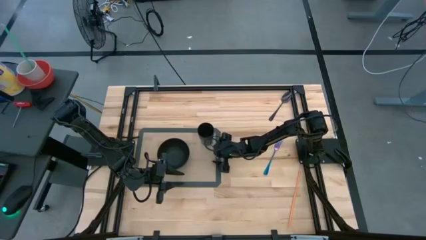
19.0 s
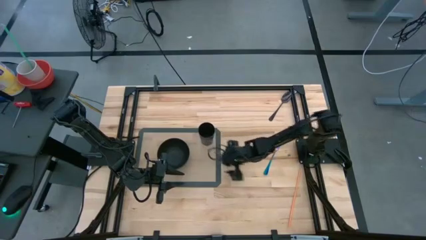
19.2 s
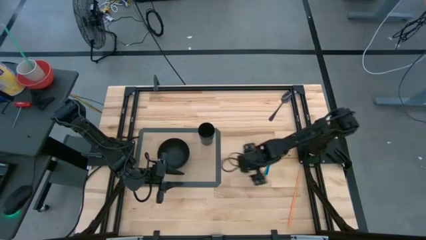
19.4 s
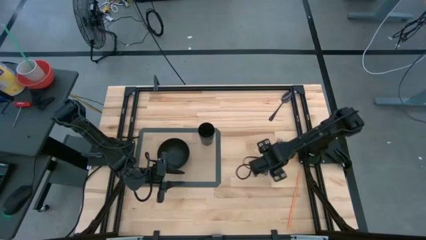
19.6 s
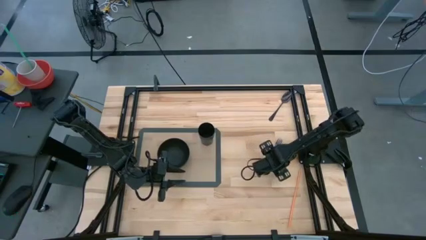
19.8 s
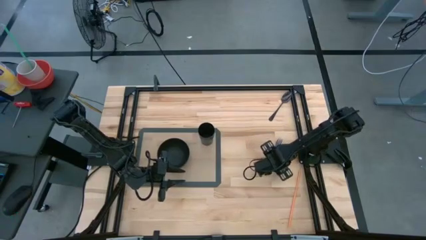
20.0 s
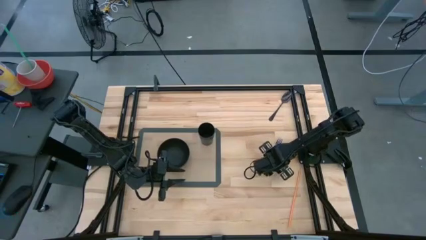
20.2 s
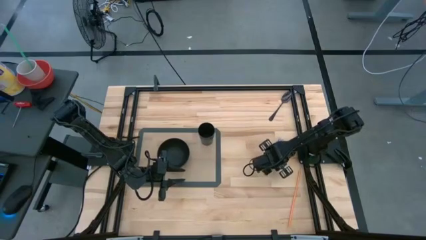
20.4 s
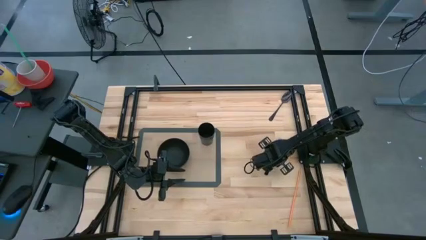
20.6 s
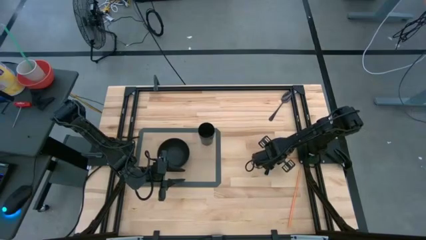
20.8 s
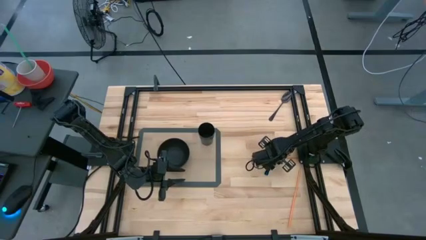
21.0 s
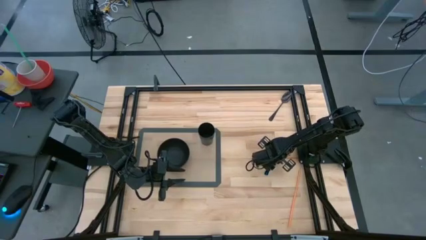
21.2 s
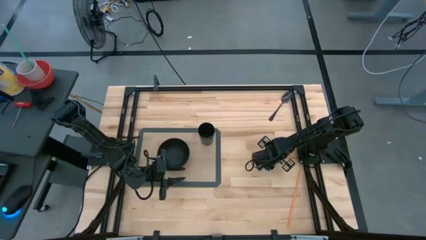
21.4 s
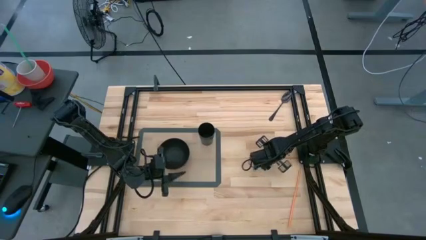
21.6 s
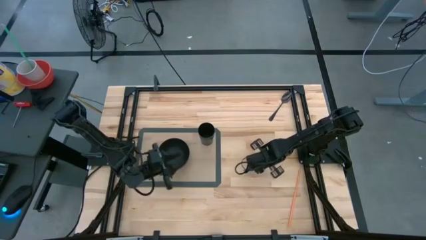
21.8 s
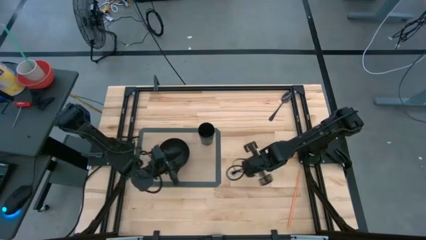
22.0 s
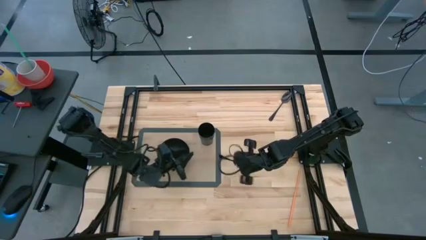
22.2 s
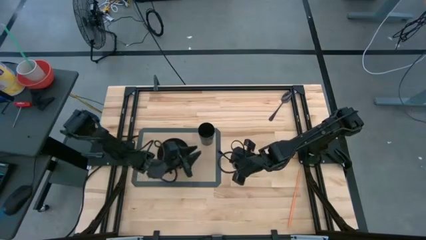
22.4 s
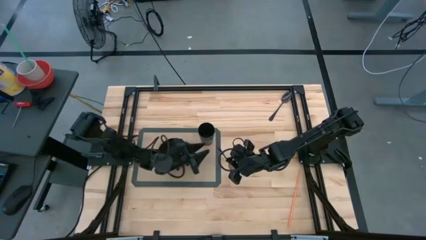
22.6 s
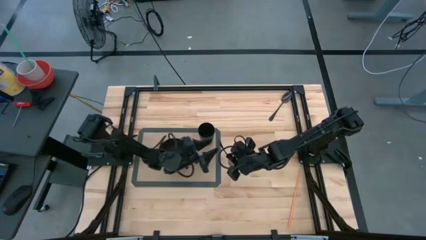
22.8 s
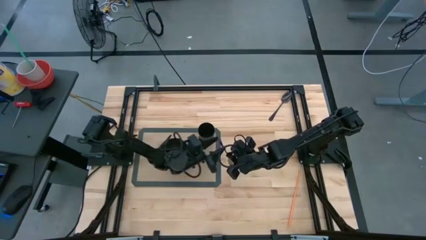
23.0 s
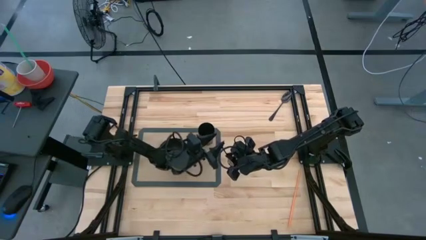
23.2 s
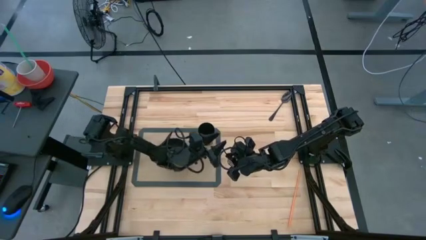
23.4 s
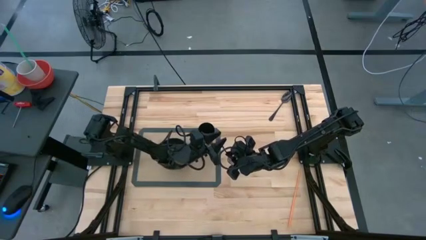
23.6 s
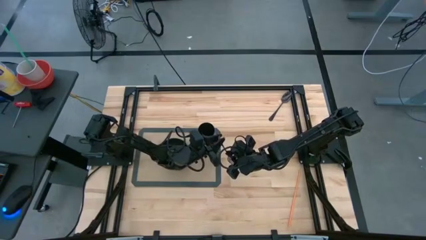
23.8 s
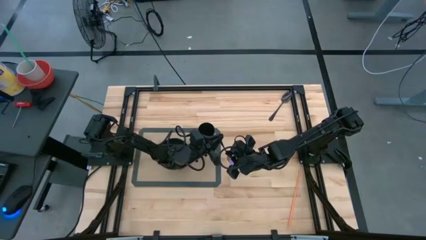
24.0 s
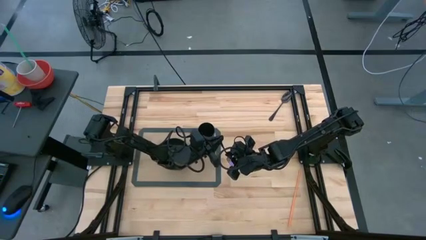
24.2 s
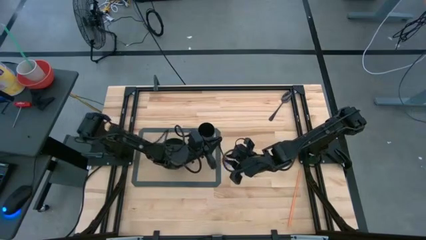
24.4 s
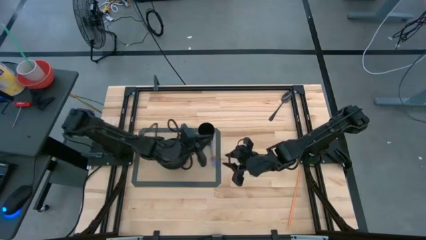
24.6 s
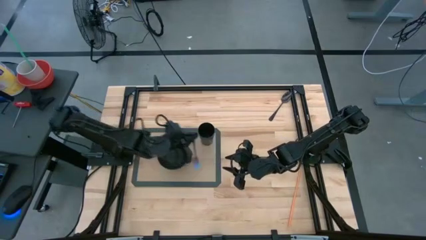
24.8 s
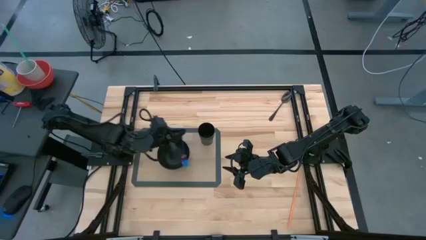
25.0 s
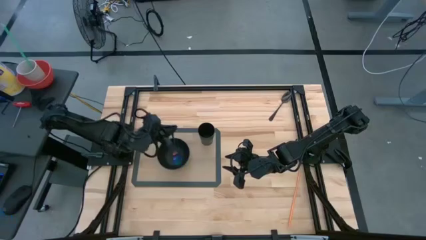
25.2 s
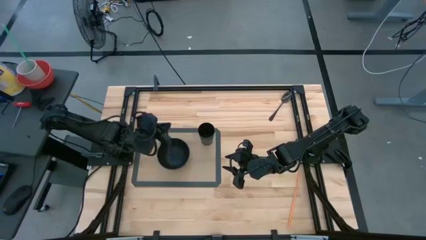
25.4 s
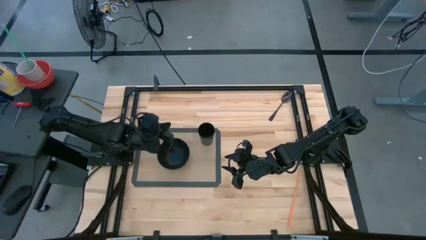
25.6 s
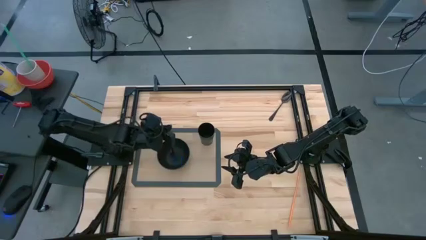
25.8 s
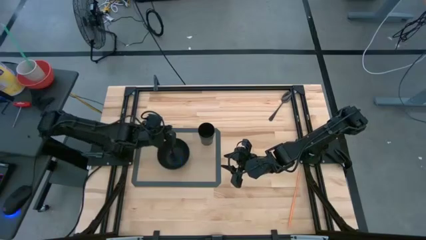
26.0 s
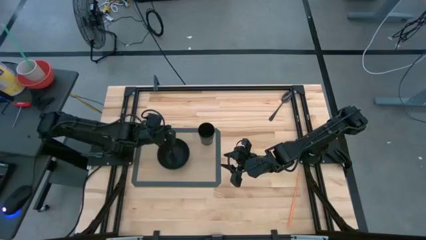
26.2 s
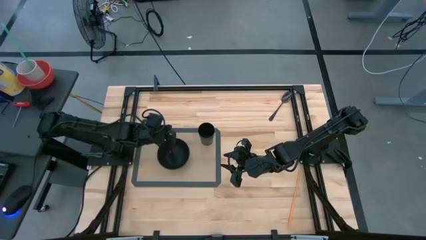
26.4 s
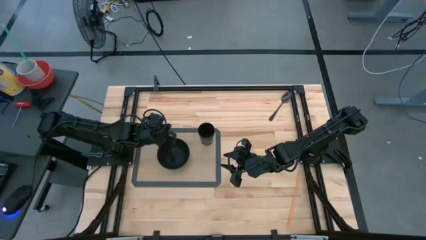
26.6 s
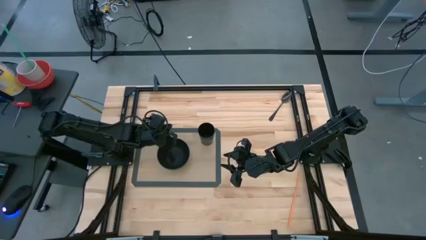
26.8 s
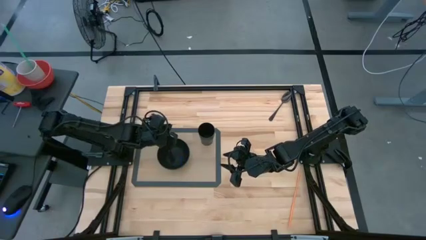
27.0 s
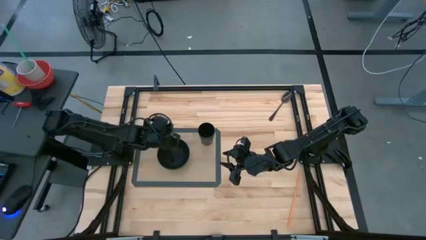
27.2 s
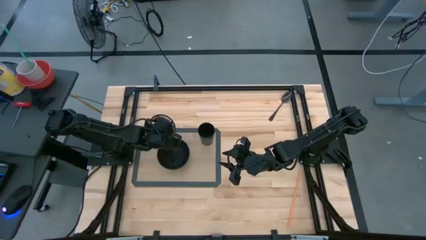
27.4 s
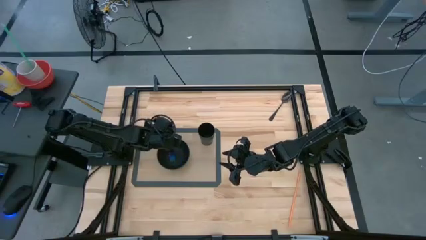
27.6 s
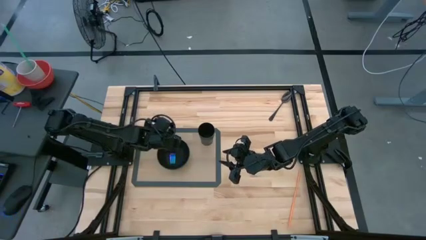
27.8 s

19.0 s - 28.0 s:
Task: Pick & Place Utensil
Put the blue fork into the black bowl on the gray placemat

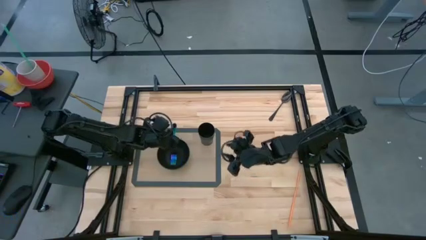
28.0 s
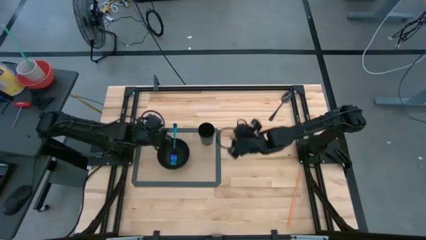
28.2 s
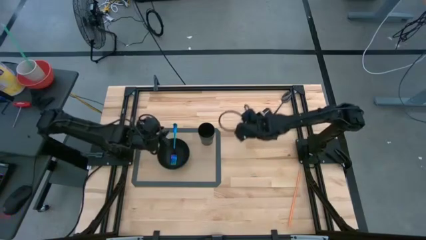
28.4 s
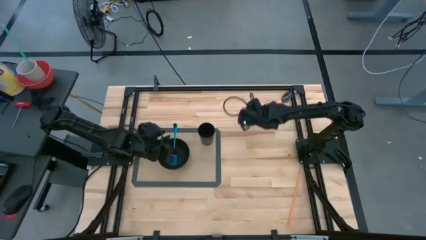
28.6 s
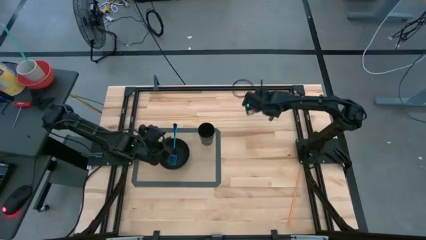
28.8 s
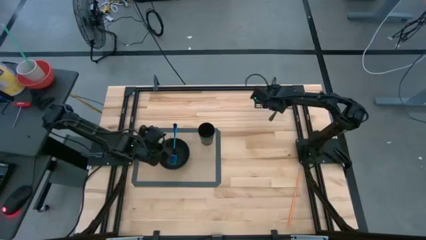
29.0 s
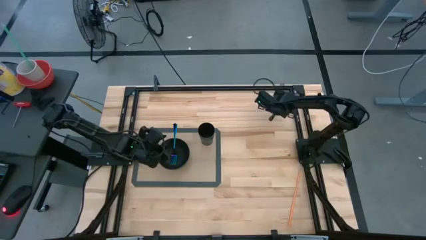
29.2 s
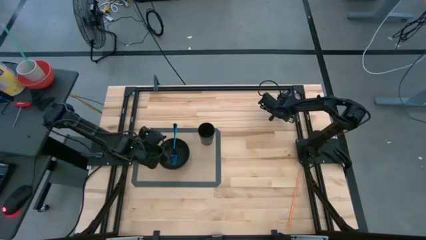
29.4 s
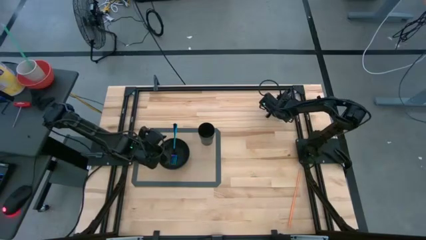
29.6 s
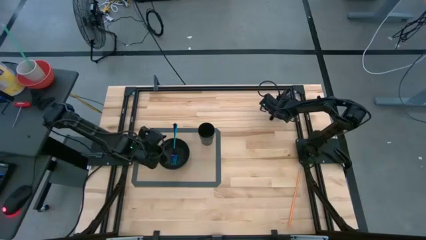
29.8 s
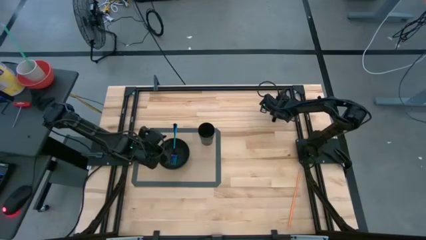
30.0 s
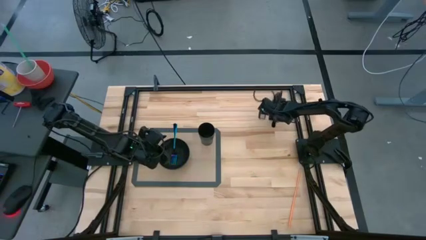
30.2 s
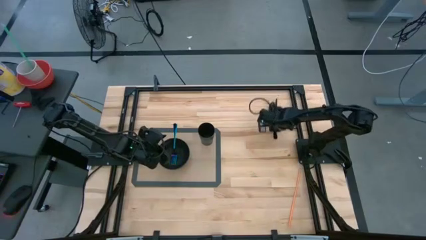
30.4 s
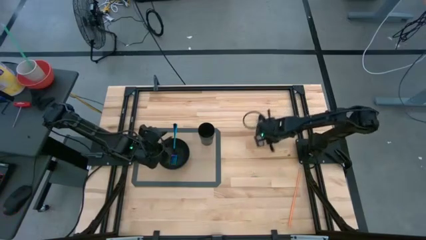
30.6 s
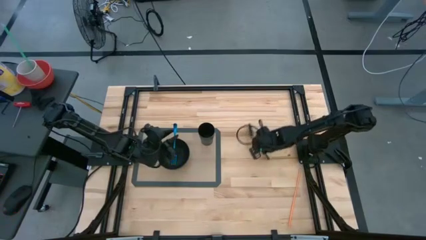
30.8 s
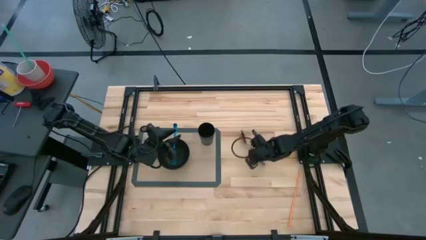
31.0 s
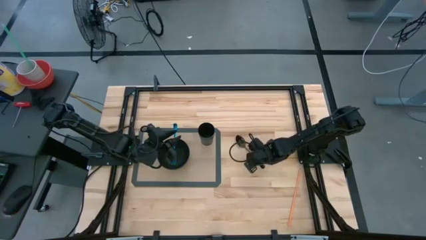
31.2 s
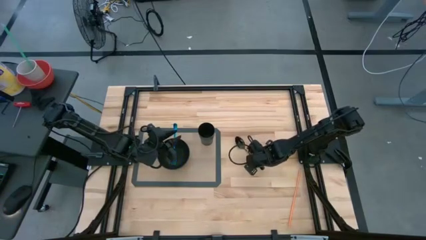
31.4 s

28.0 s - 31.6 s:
Put the blue fork into the black bowl on the gray placemat

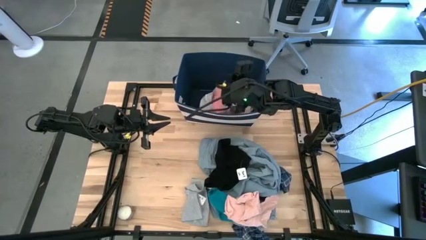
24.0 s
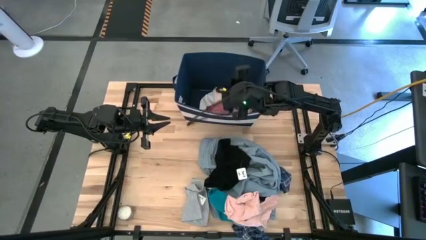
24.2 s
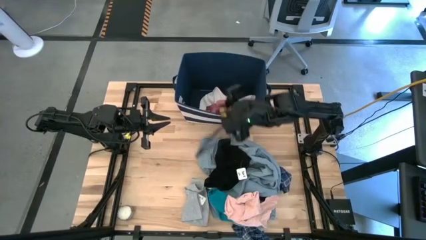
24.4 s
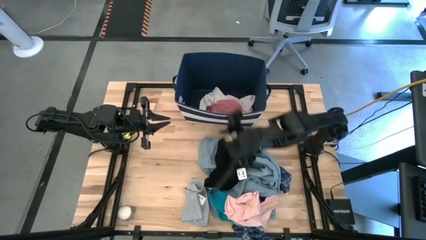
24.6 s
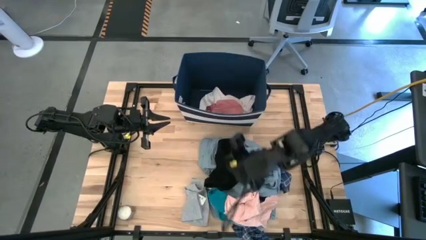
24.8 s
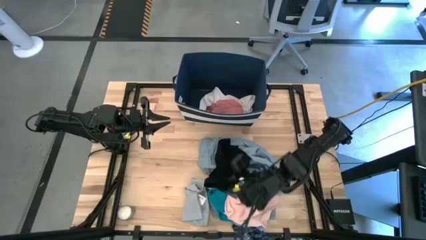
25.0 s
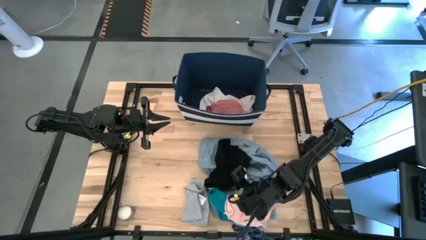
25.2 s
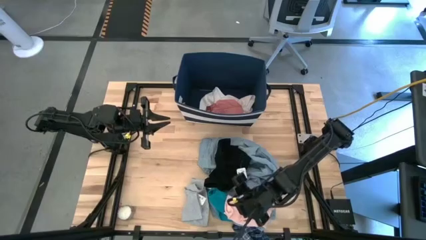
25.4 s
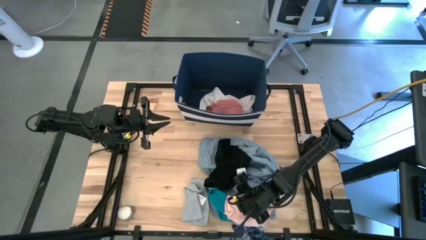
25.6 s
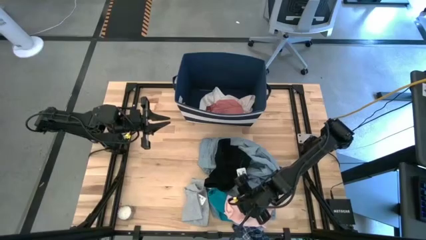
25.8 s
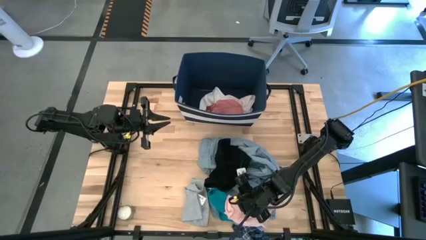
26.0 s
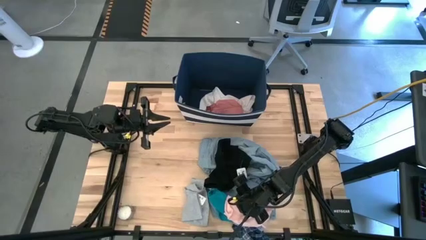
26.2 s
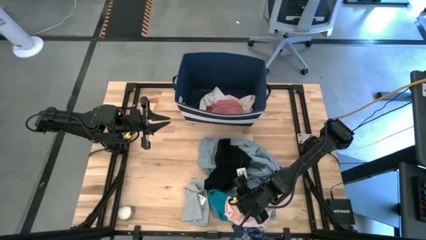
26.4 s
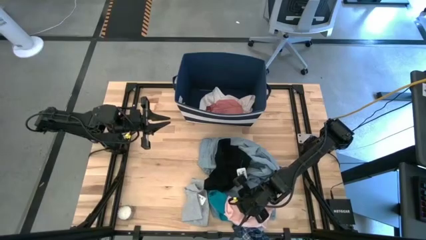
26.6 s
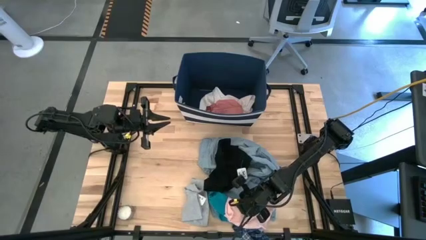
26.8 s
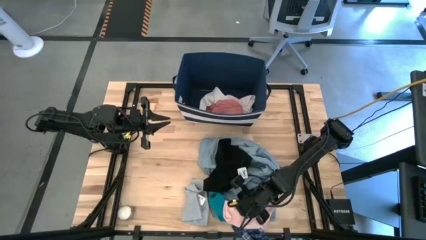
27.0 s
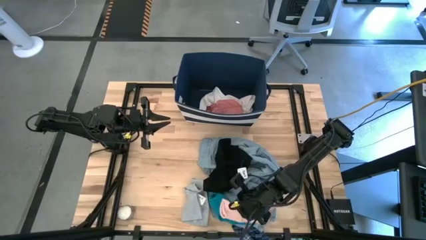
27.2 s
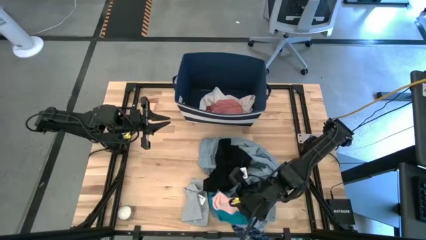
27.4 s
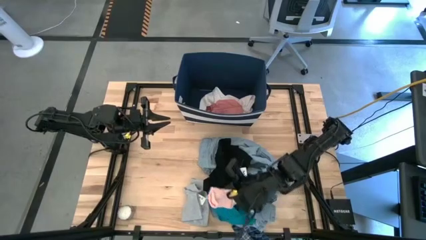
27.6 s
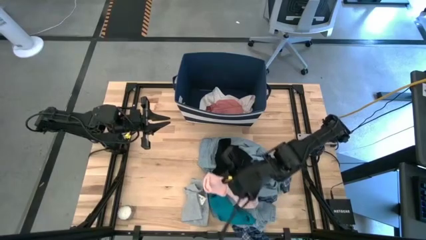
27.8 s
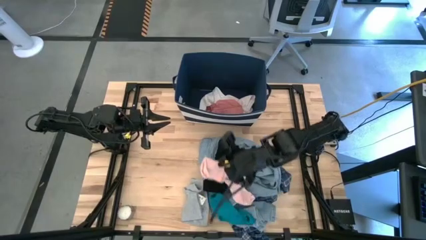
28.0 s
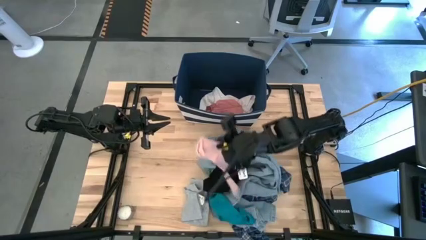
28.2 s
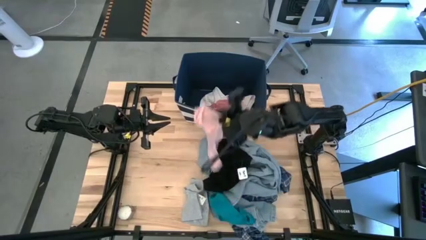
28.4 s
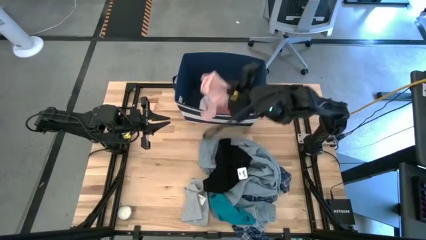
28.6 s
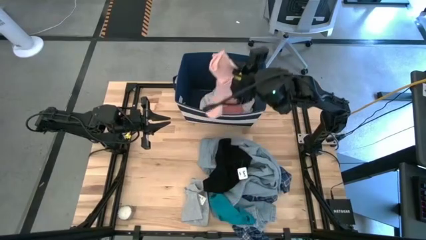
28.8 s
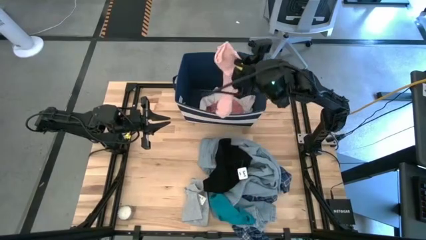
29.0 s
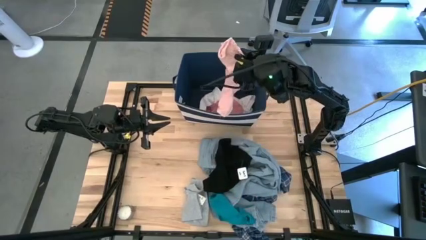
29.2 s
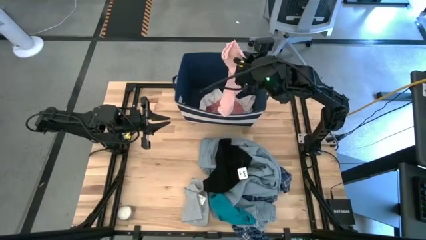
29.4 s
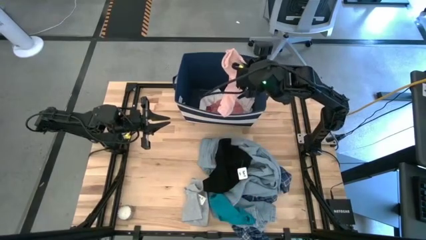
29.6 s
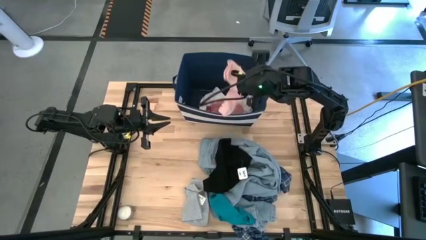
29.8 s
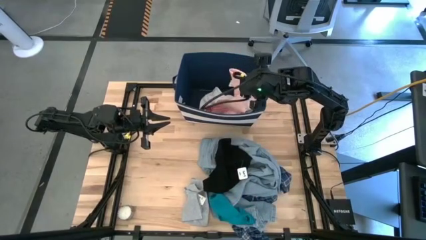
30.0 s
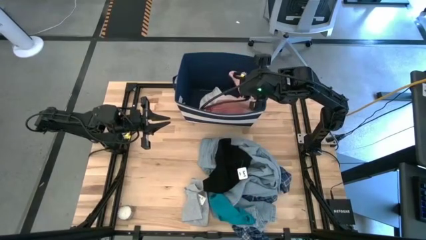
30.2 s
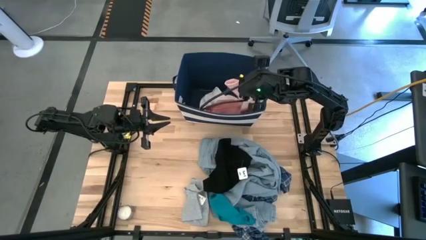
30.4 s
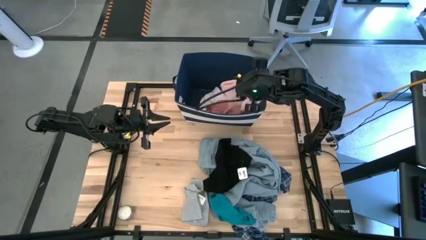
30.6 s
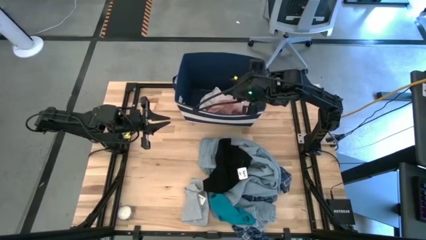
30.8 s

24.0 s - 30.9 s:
Task: Sort clothes
Put the pink socks into the blue bin
